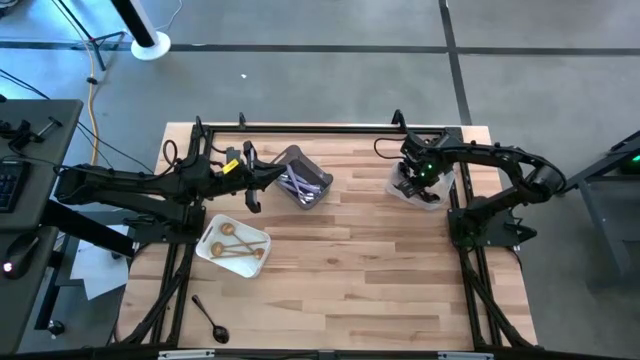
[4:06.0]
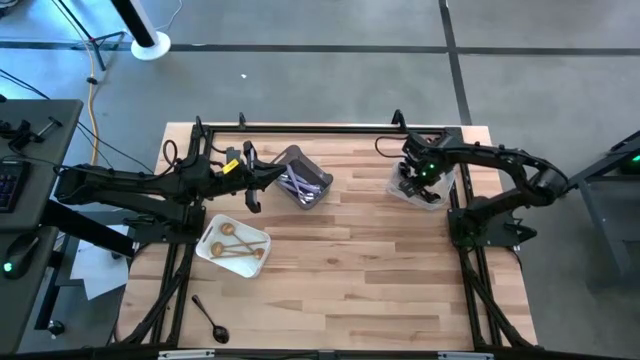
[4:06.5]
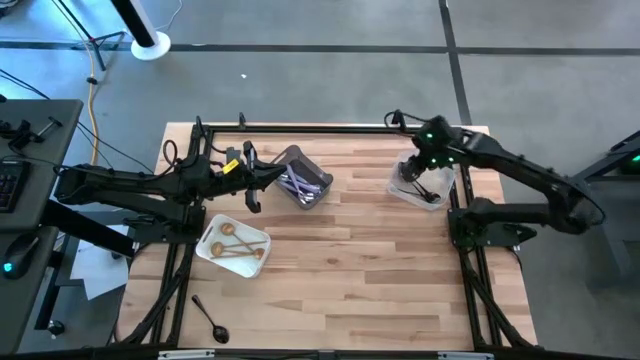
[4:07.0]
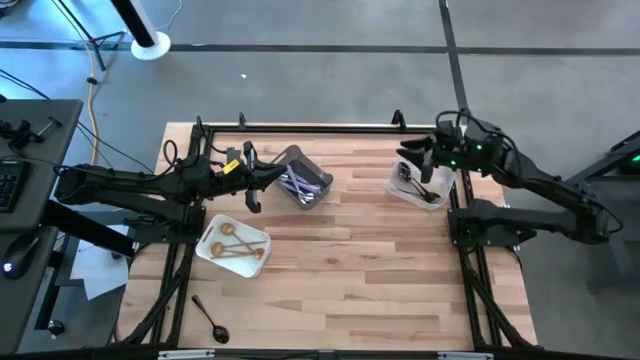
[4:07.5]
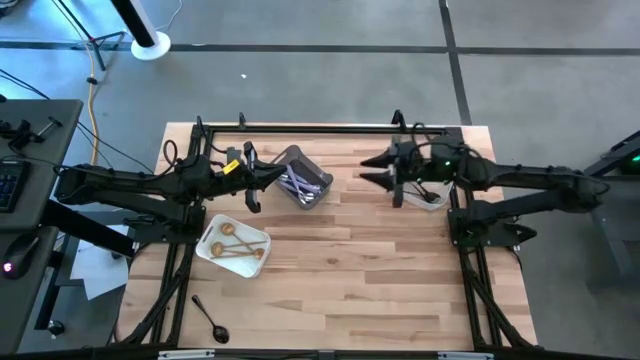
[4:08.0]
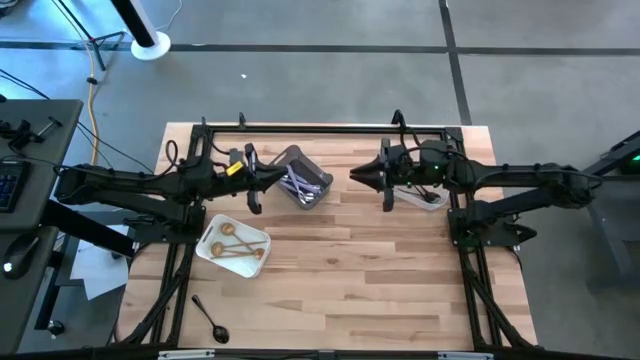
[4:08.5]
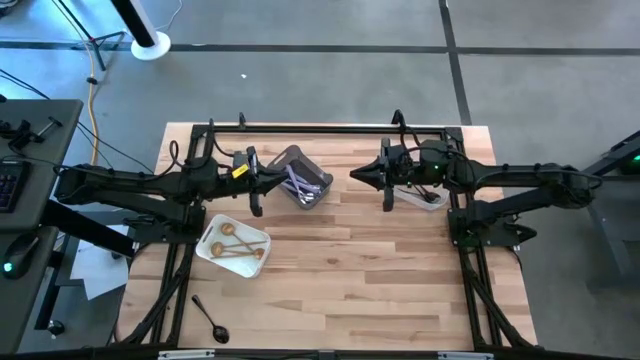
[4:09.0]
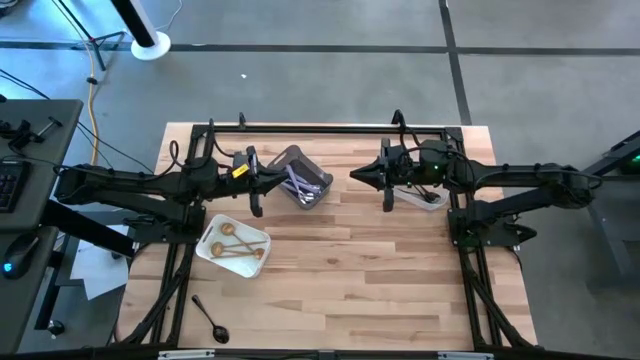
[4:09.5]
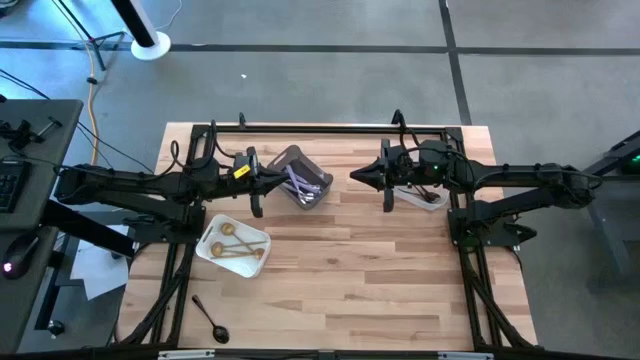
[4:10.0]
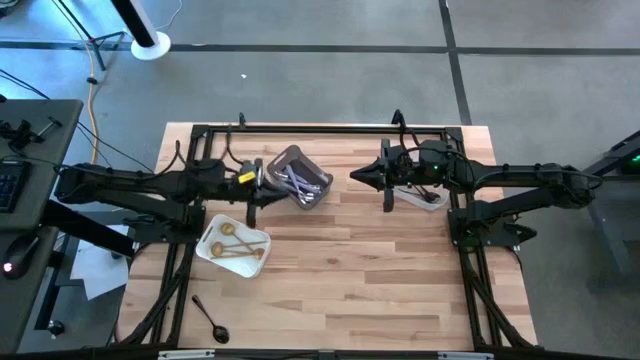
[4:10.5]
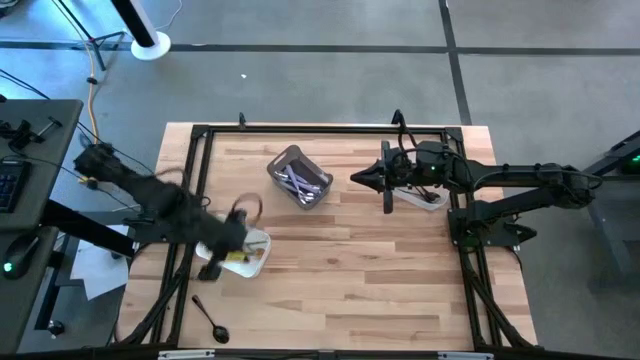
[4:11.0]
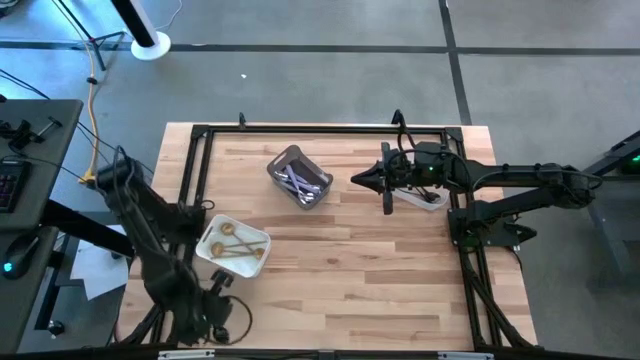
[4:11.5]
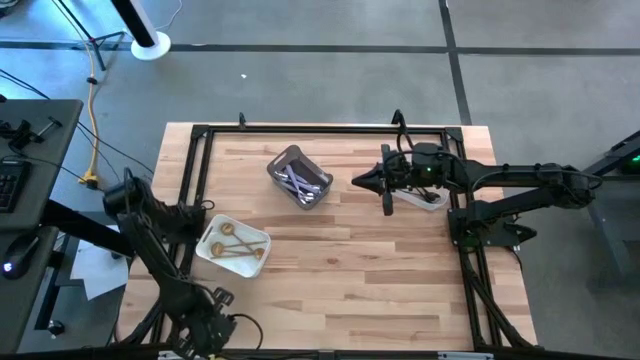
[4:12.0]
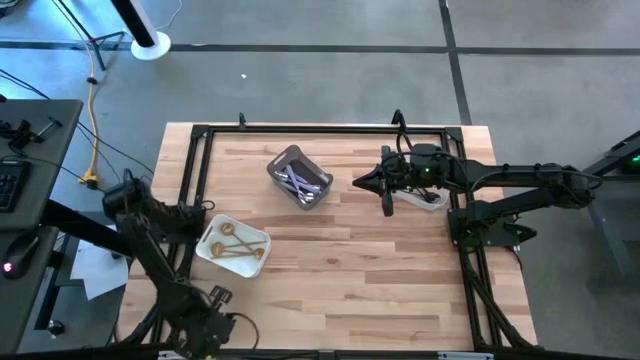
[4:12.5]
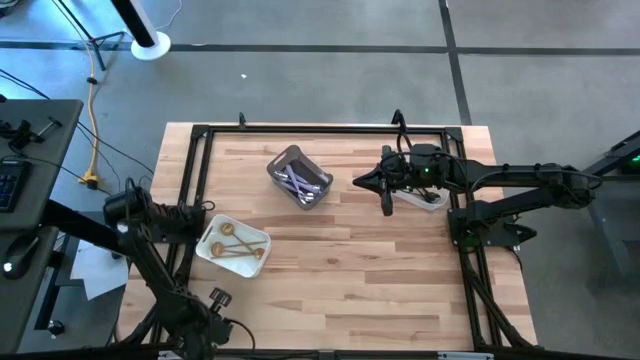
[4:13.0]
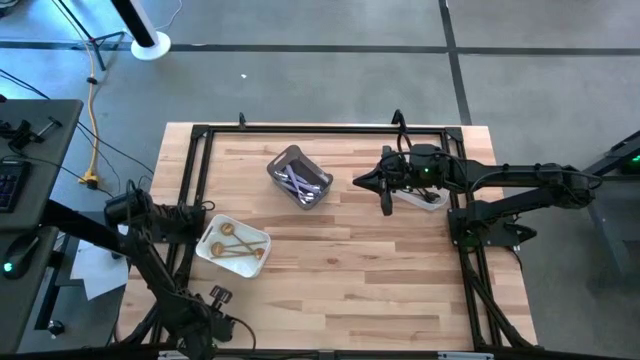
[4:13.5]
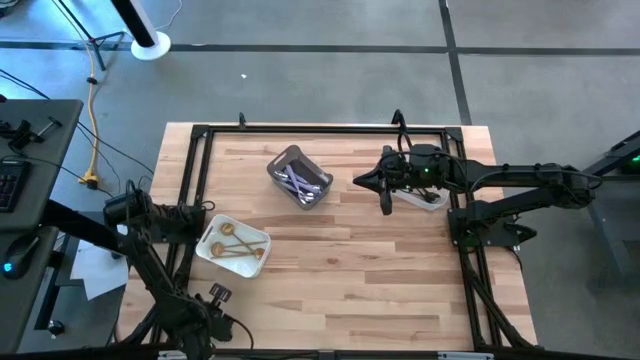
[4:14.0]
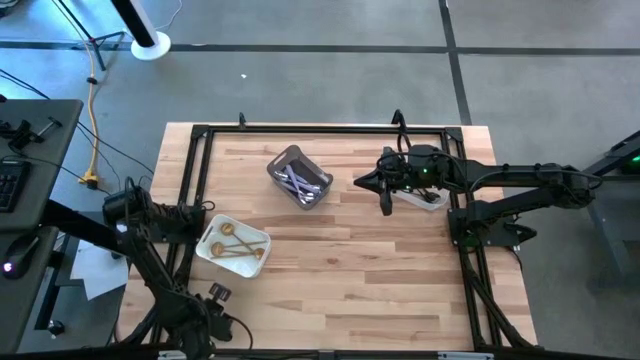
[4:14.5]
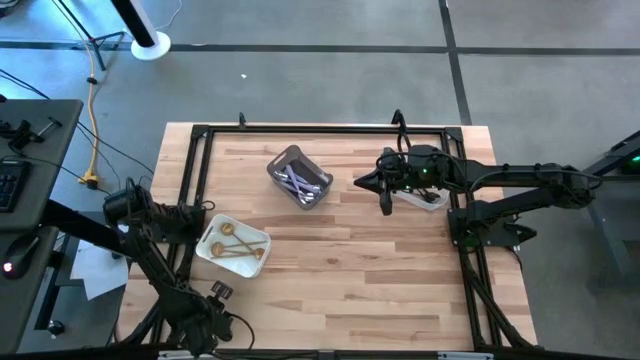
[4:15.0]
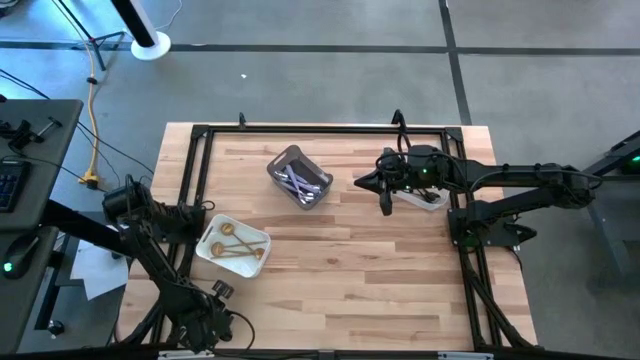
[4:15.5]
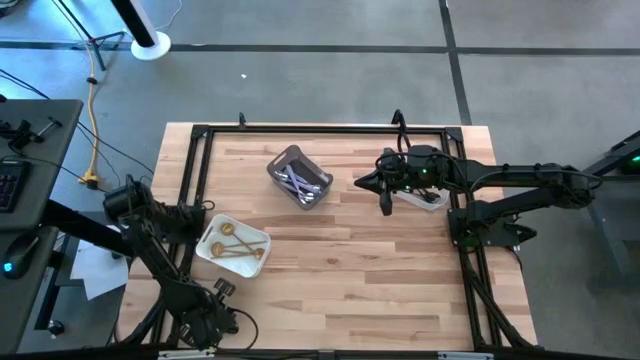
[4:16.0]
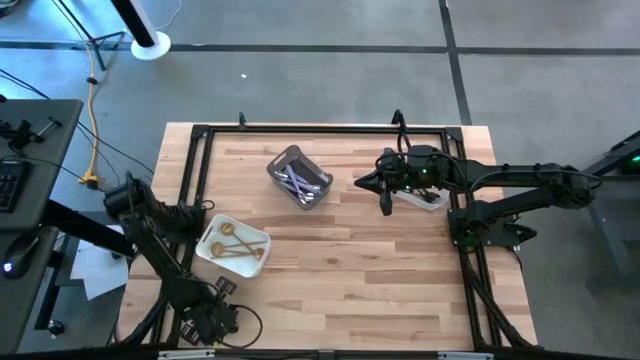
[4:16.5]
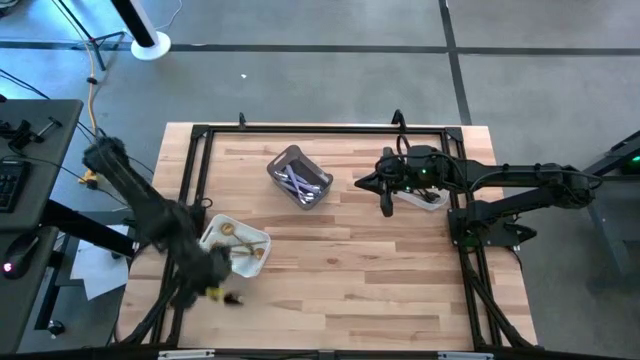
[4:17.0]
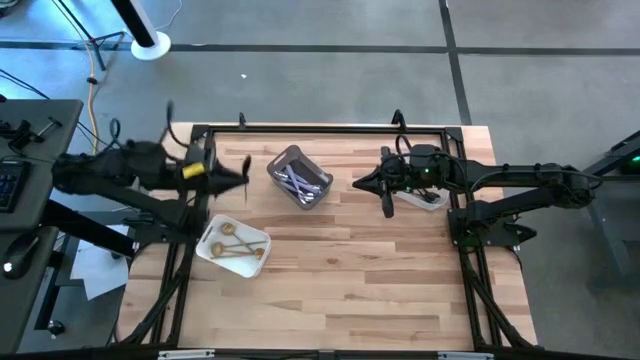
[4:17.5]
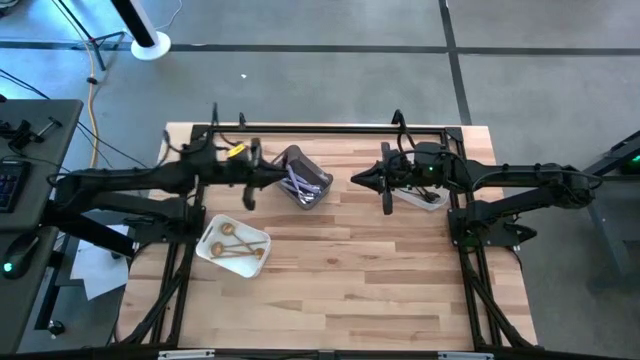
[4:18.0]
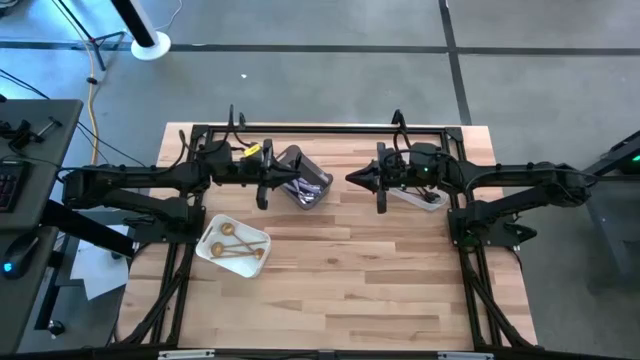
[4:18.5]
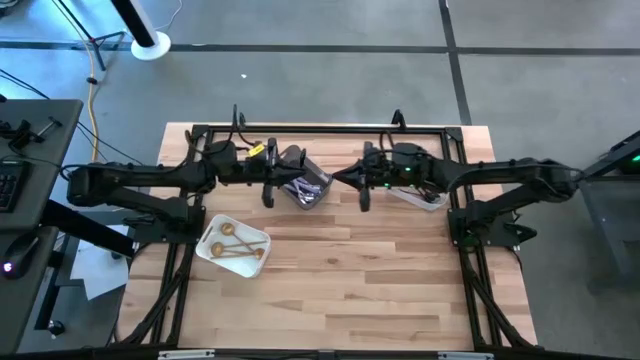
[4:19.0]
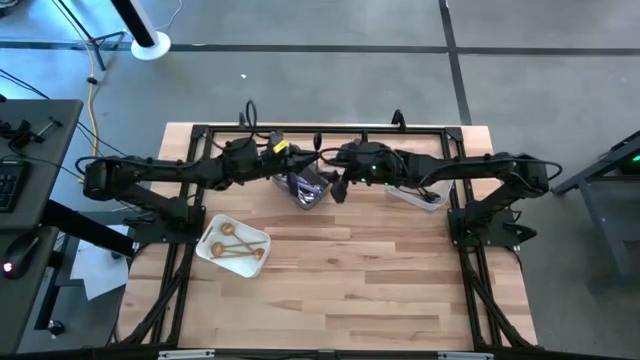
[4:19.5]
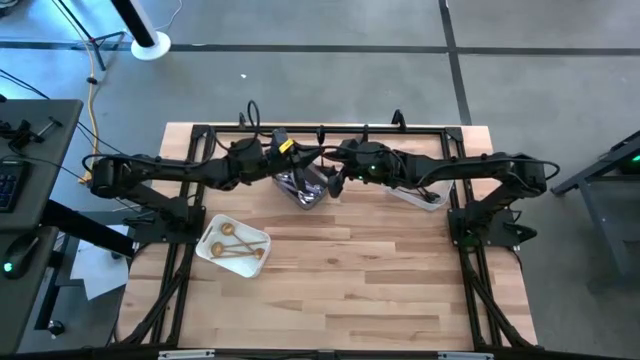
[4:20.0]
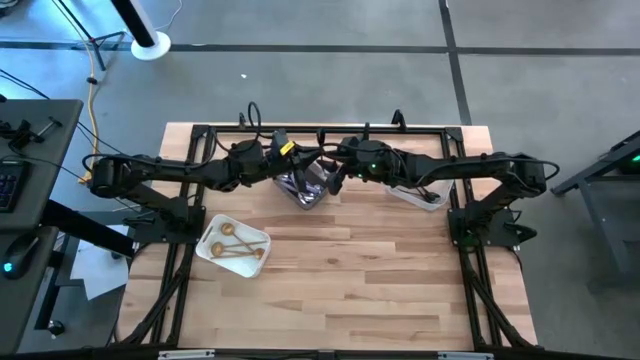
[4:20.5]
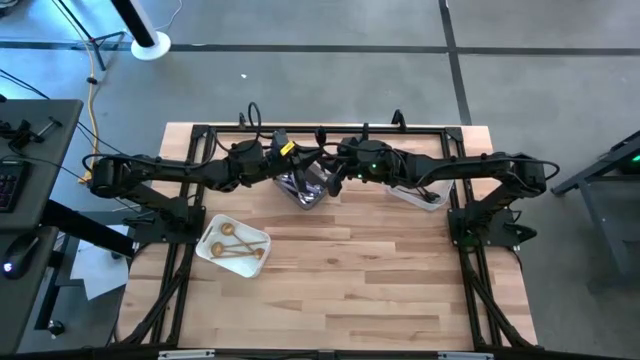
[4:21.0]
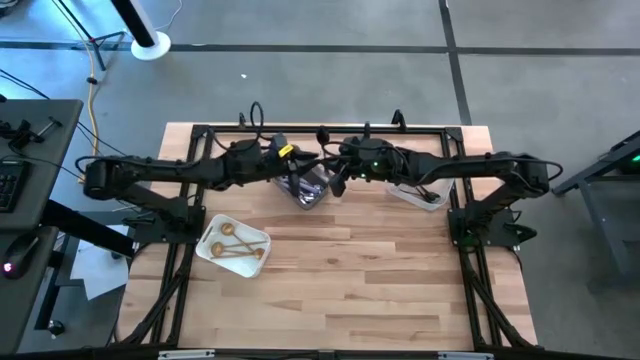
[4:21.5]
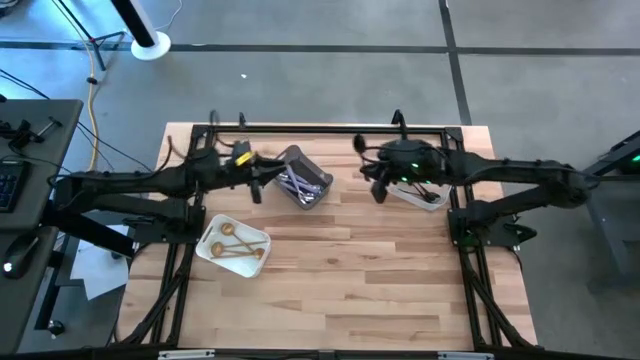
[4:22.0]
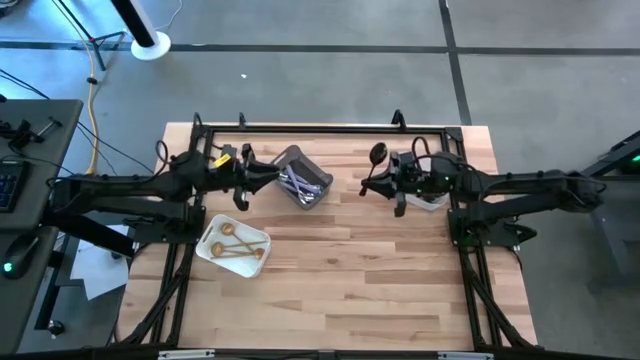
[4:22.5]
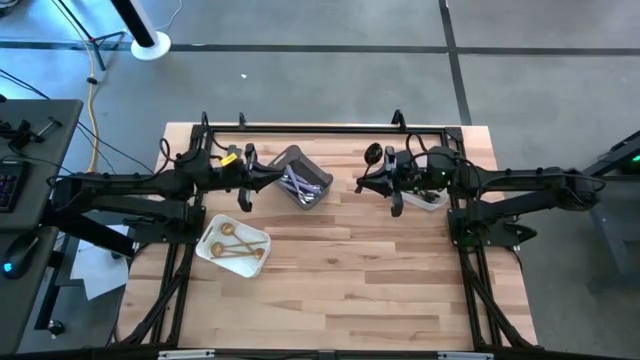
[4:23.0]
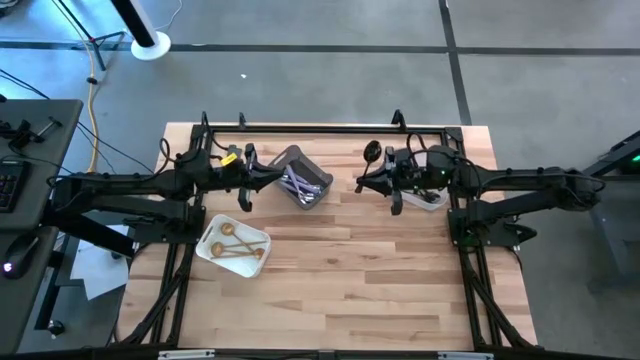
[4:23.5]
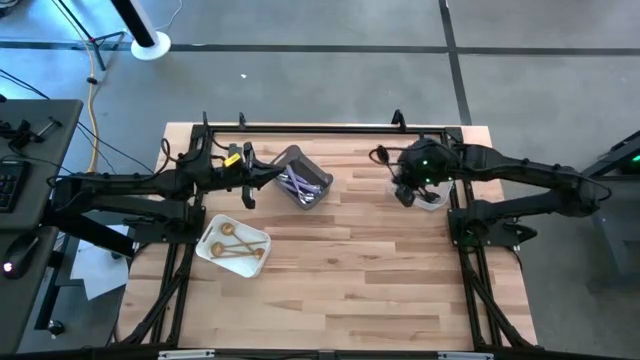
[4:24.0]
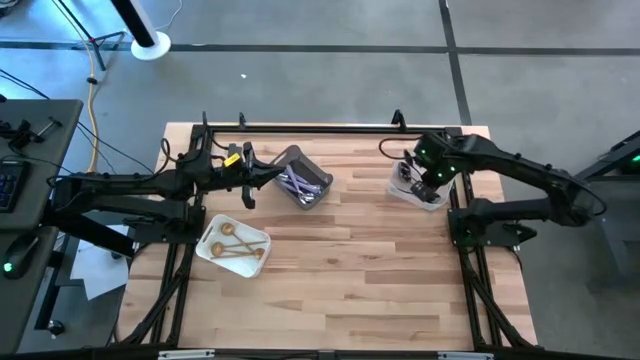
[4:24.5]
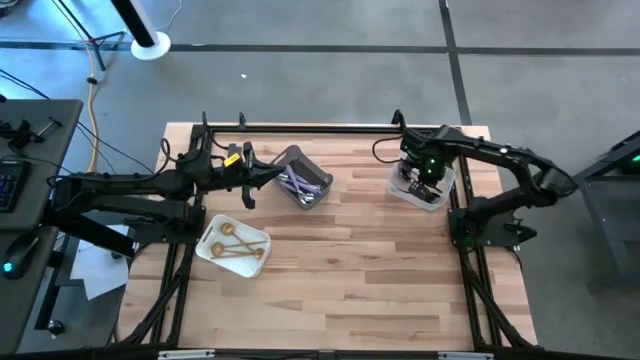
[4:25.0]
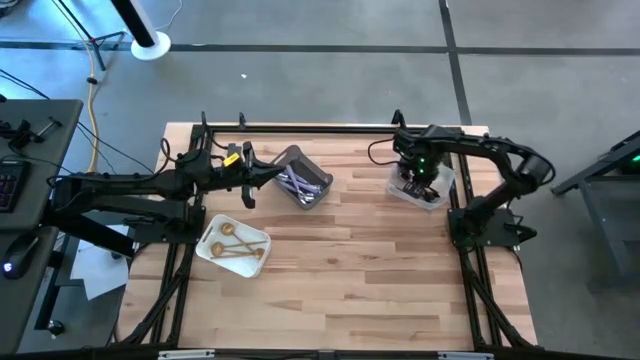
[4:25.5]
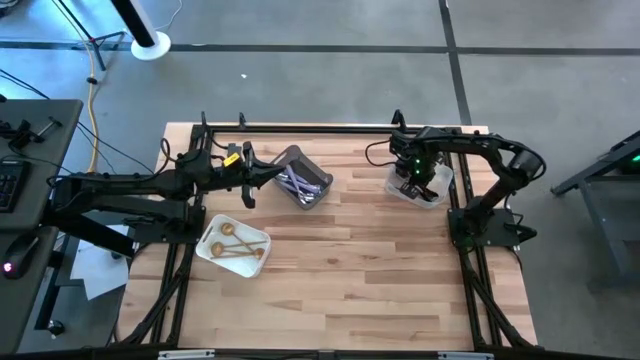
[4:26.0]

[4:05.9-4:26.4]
Task: Sort silverware by color (type)
Put the black spoon into the transparent bin
